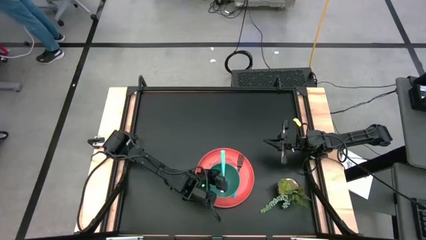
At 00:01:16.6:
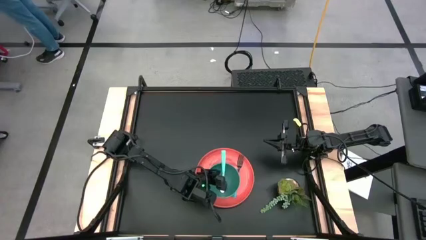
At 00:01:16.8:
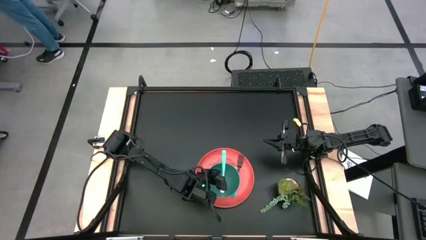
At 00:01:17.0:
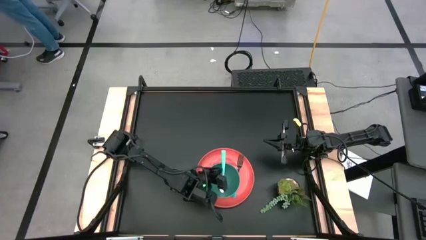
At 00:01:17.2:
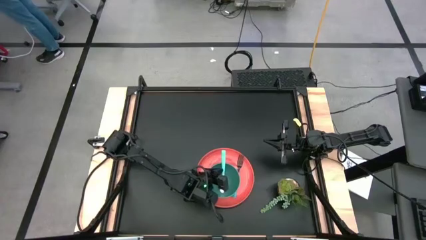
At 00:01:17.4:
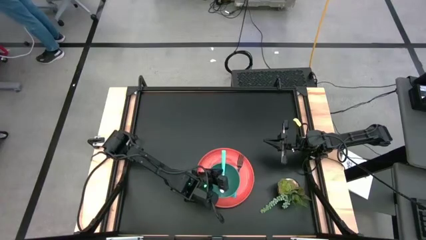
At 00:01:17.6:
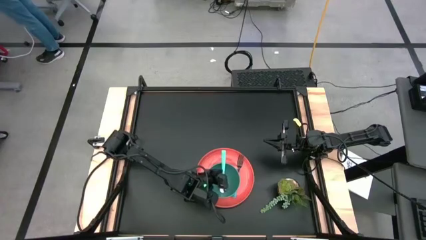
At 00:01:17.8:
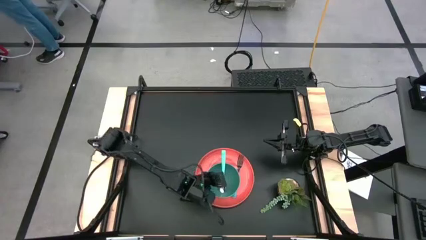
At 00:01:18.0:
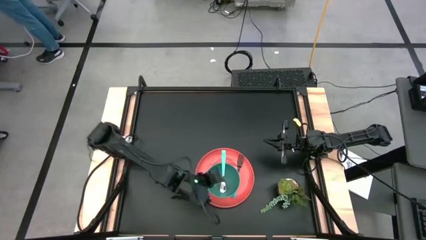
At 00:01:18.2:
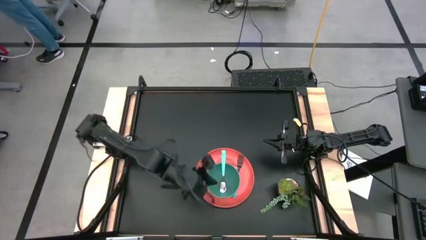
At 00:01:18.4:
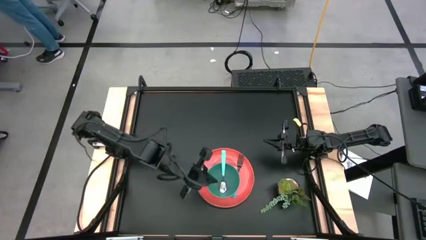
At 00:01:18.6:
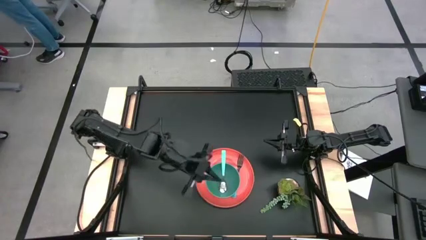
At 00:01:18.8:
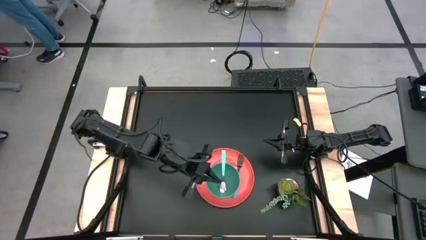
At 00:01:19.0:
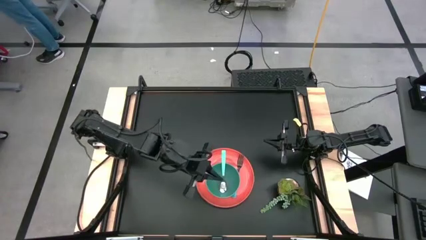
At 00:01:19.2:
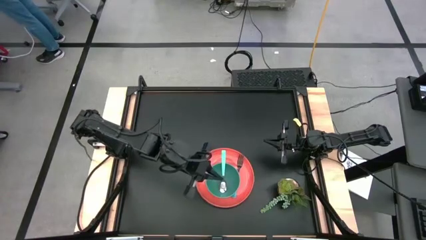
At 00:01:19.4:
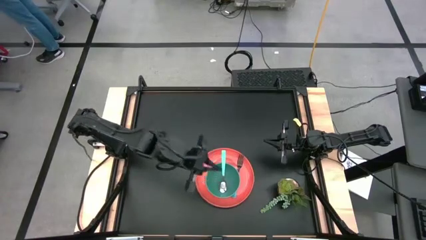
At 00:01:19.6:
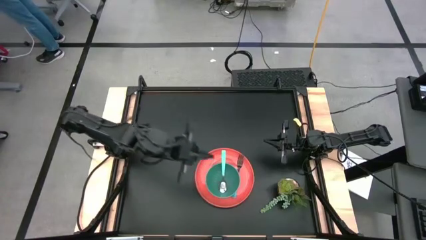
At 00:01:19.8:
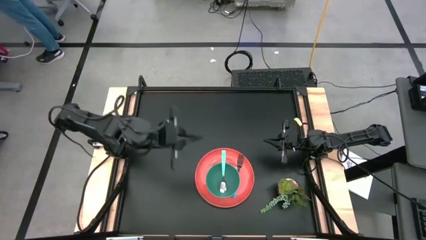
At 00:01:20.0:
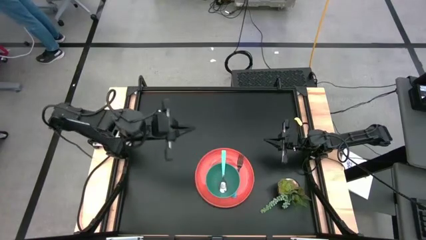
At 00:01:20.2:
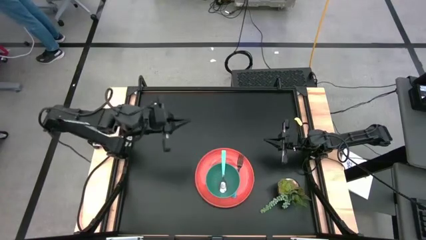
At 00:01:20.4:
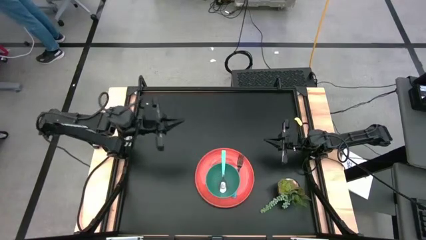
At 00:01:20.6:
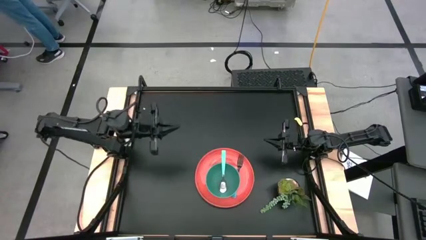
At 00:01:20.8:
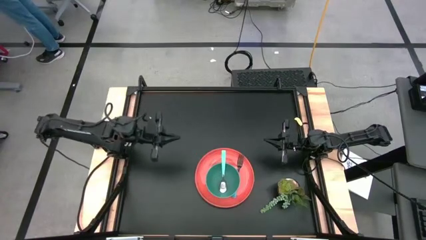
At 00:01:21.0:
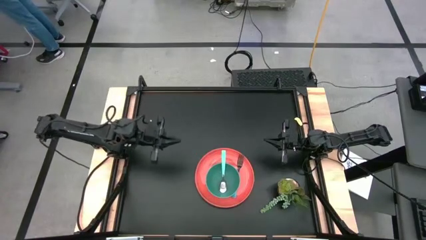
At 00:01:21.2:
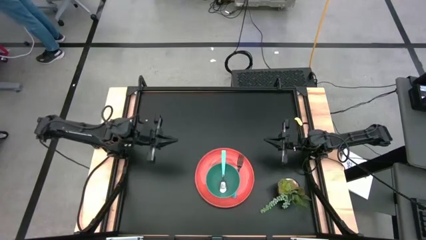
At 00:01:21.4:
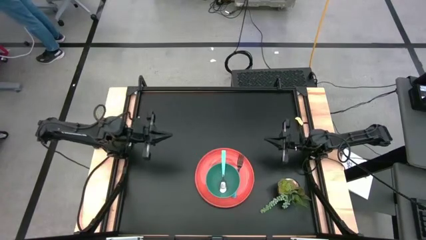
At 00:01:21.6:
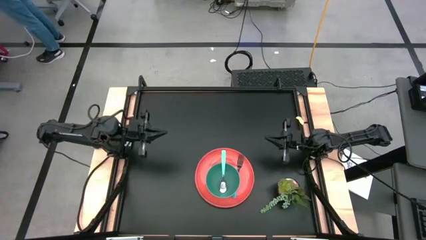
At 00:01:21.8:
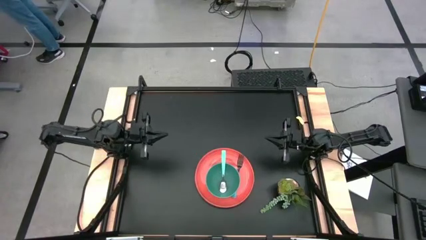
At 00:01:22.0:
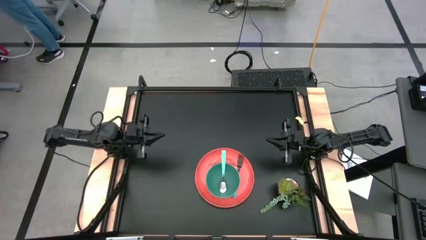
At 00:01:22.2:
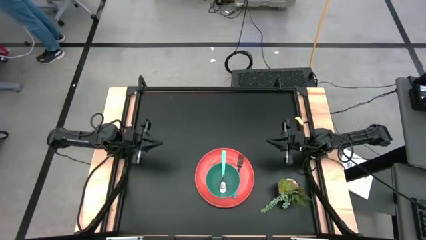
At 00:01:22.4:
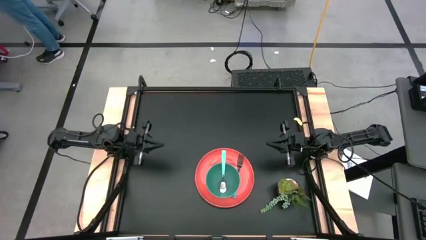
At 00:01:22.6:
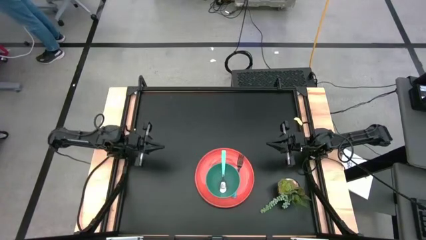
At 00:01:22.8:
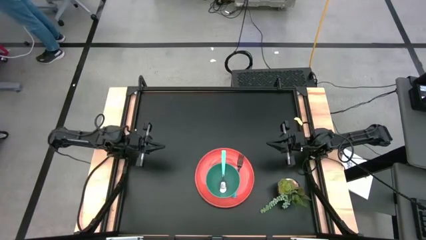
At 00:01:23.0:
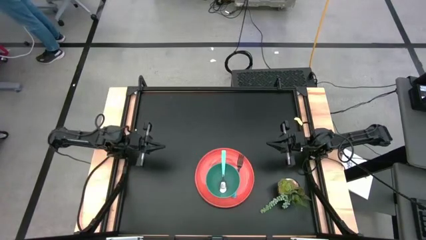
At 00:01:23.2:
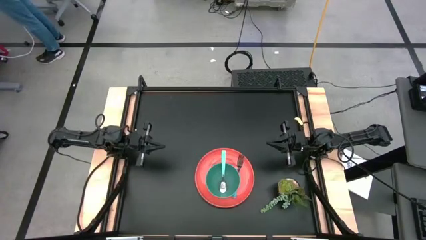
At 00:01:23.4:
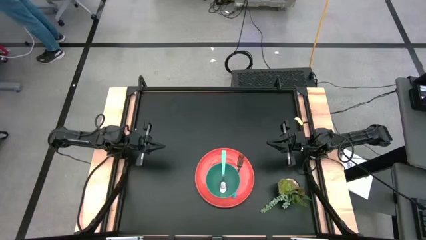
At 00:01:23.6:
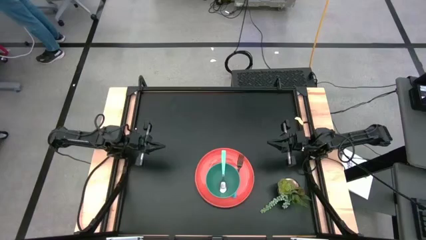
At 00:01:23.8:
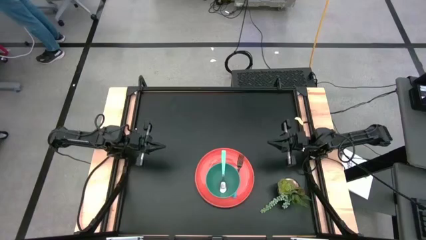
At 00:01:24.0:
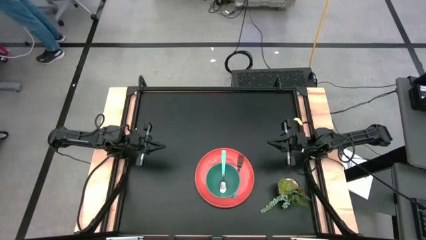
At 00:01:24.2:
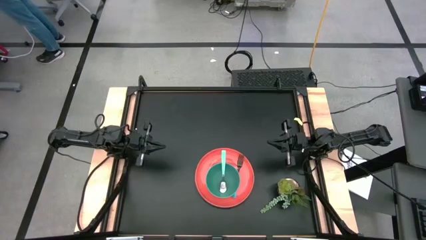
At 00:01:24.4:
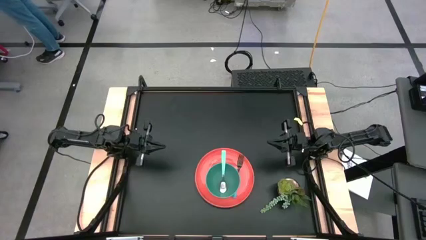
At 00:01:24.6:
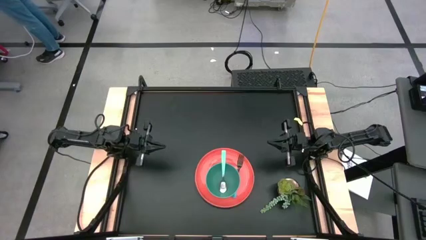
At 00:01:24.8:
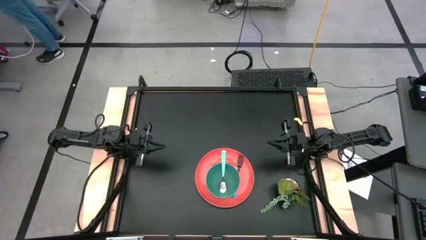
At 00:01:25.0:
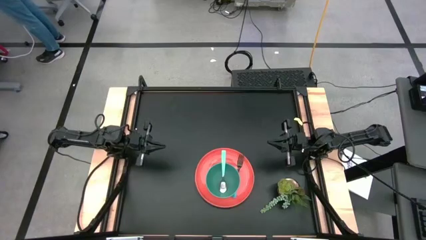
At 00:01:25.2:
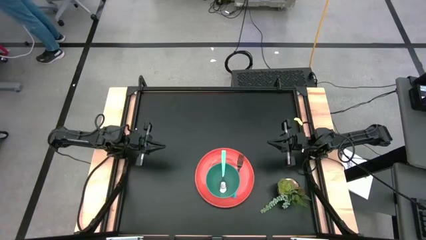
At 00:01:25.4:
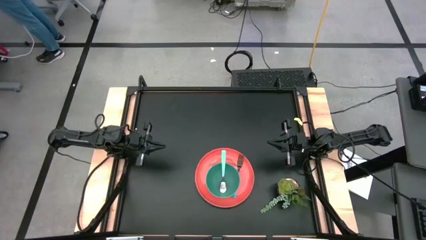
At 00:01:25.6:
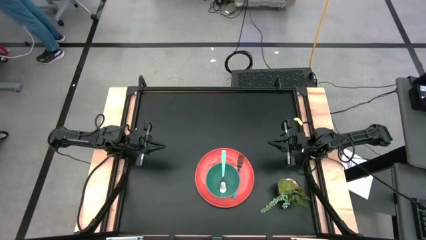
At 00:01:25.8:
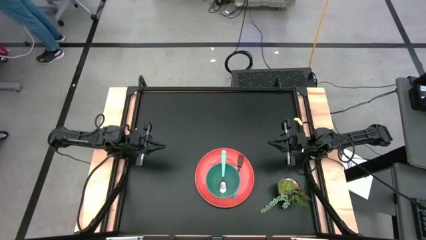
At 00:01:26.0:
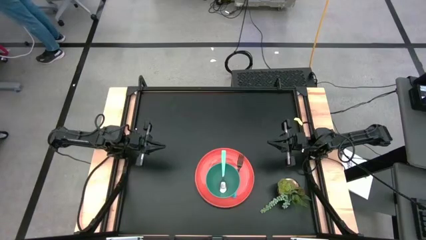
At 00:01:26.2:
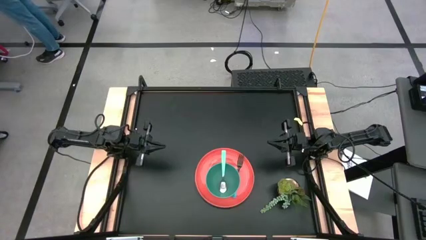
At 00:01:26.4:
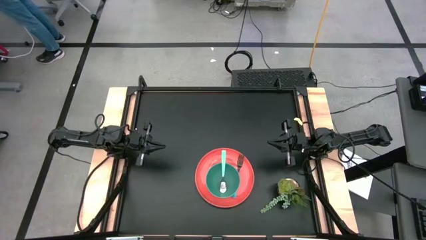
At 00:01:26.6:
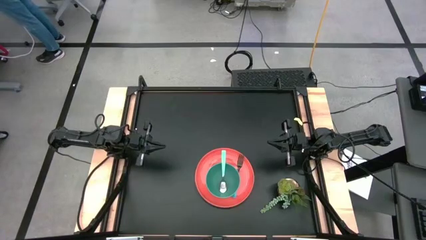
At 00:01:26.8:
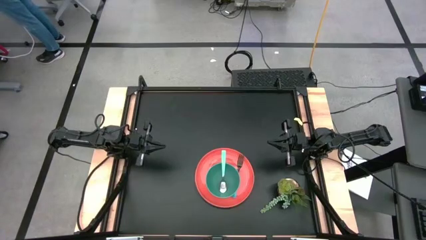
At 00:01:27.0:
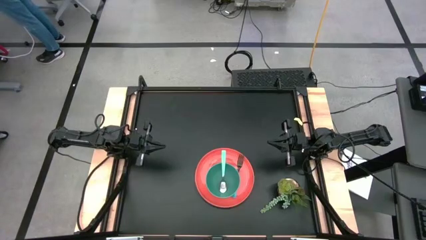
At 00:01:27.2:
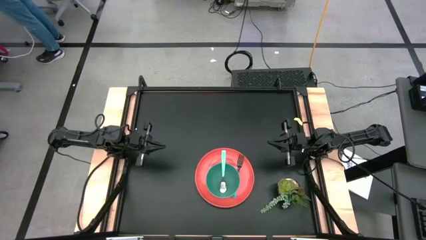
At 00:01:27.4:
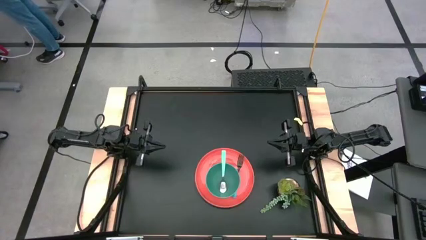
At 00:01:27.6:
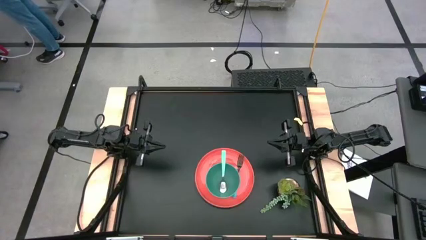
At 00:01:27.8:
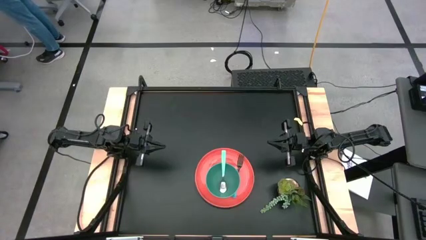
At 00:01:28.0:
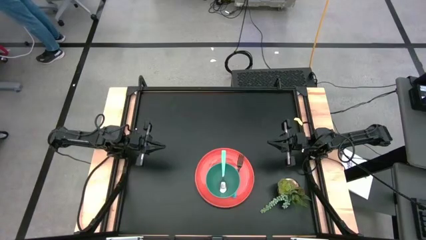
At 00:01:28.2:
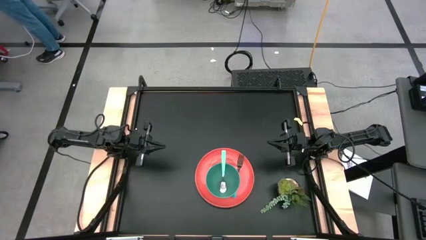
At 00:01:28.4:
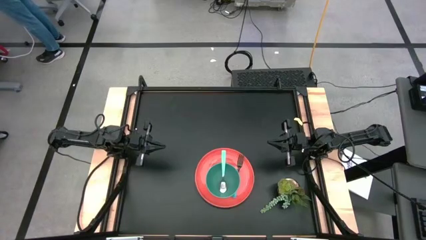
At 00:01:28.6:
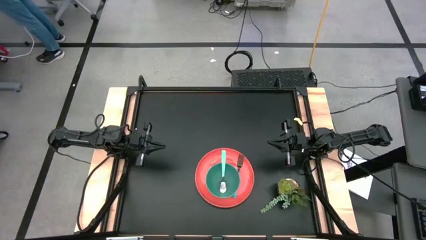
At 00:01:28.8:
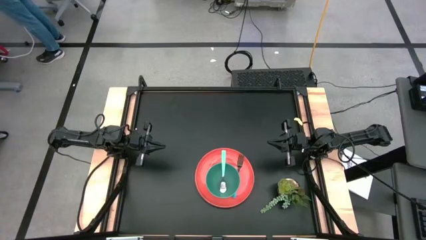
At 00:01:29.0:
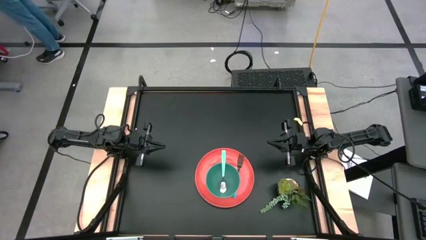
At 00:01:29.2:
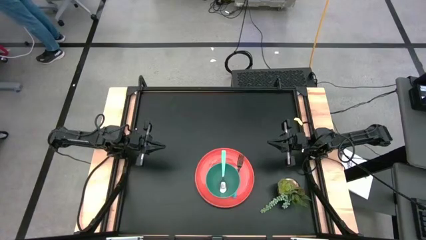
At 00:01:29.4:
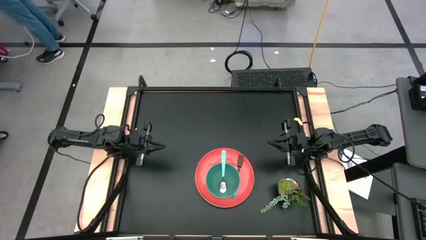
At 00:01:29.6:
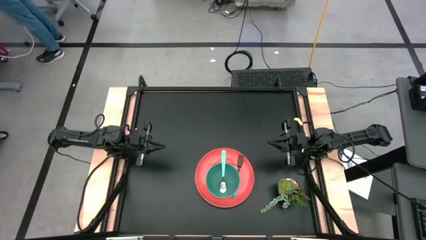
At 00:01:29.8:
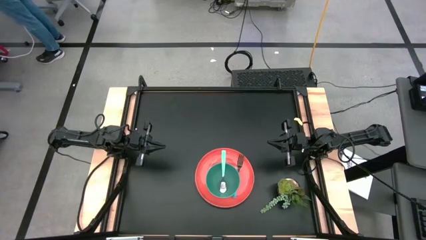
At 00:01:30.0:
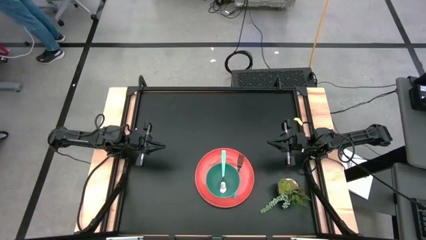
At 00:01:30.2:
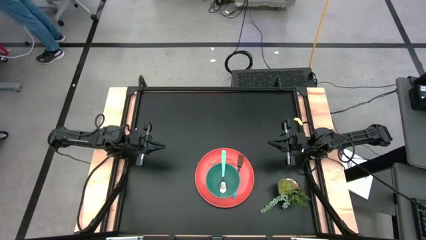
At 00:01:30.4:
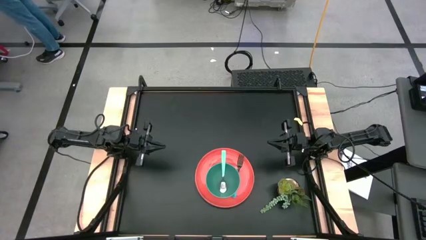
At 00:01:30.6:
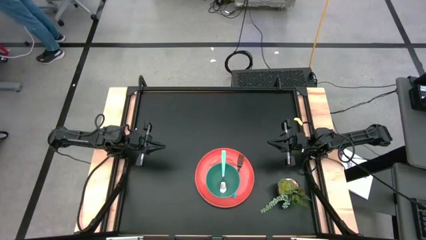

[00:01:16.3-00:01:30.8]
Task: Set table place
Return to Home Position
